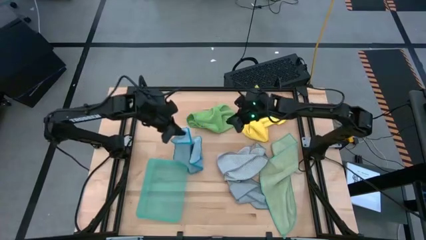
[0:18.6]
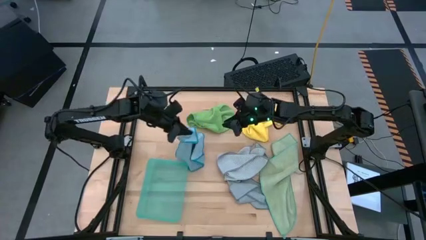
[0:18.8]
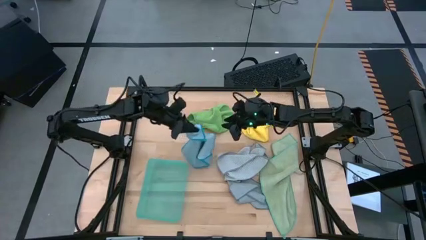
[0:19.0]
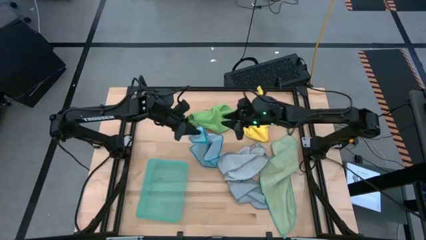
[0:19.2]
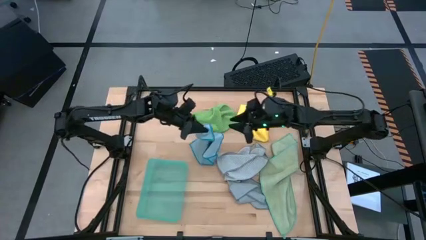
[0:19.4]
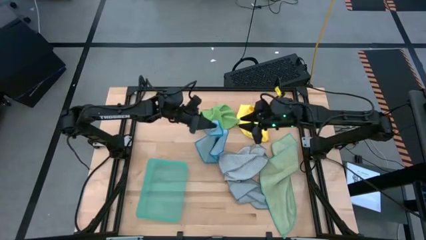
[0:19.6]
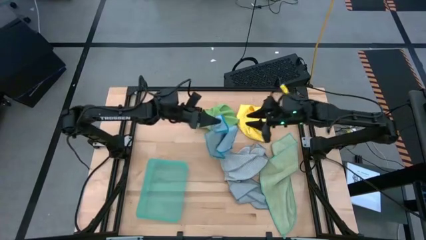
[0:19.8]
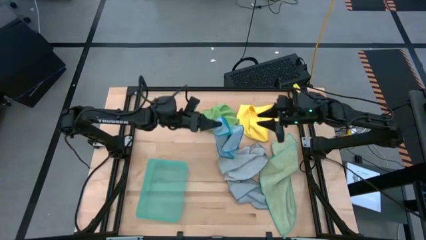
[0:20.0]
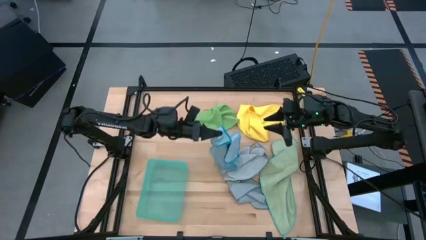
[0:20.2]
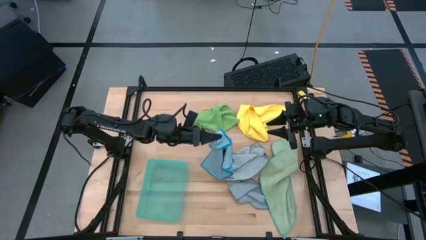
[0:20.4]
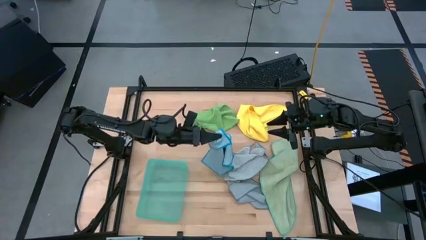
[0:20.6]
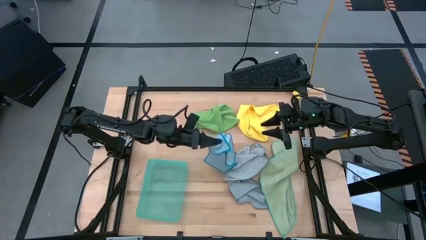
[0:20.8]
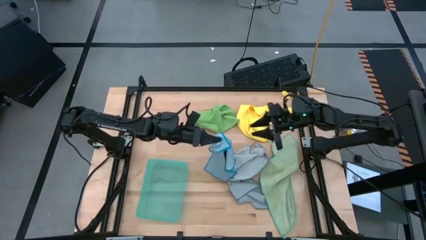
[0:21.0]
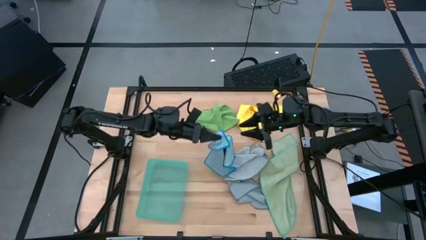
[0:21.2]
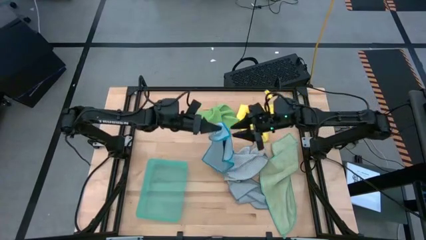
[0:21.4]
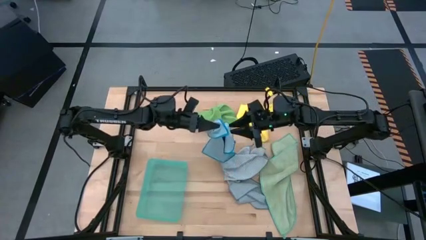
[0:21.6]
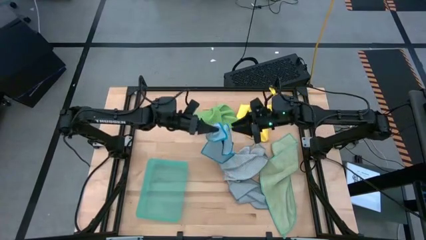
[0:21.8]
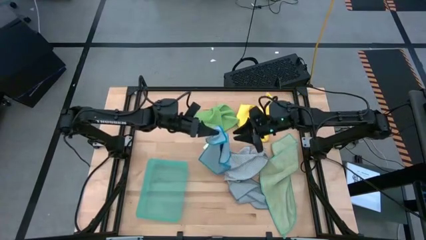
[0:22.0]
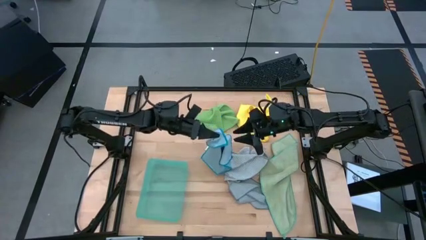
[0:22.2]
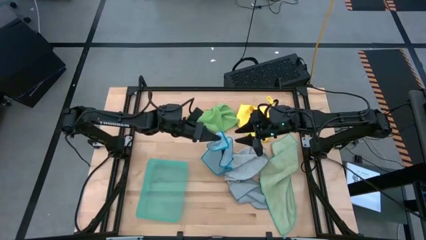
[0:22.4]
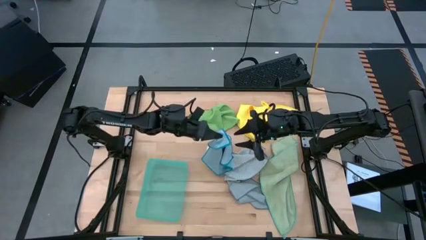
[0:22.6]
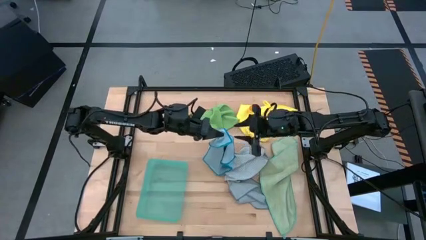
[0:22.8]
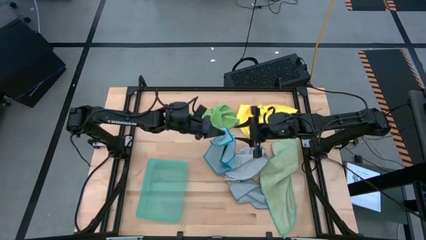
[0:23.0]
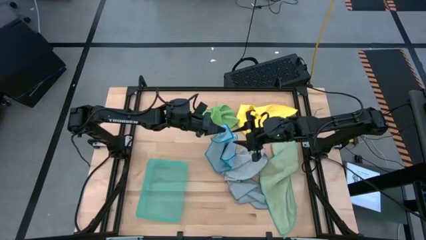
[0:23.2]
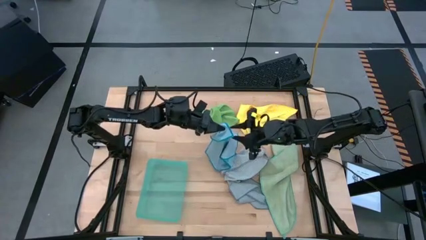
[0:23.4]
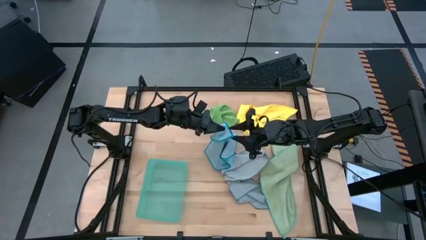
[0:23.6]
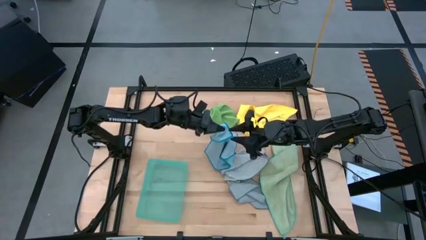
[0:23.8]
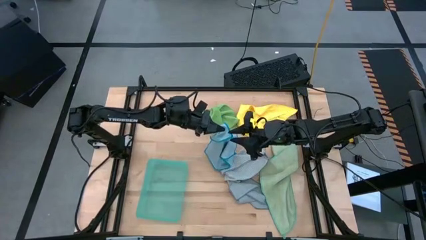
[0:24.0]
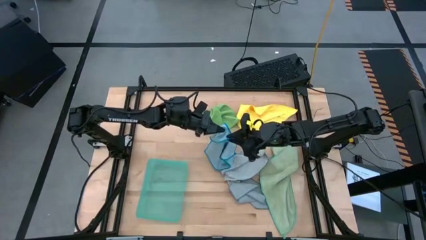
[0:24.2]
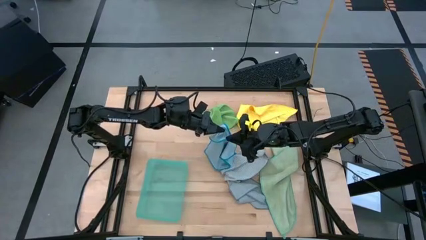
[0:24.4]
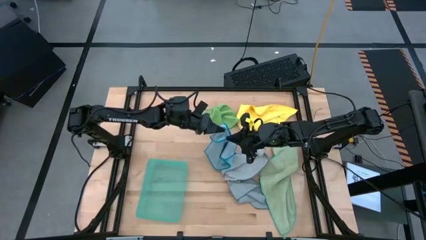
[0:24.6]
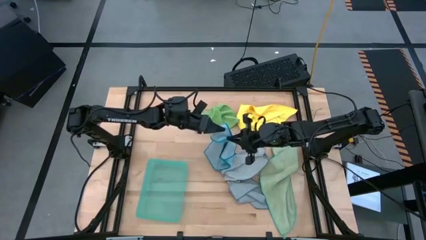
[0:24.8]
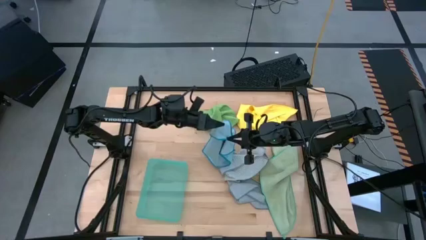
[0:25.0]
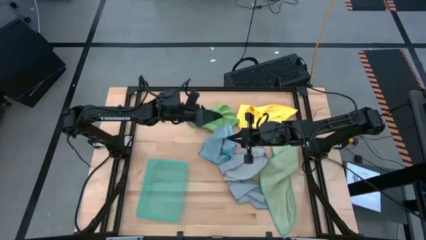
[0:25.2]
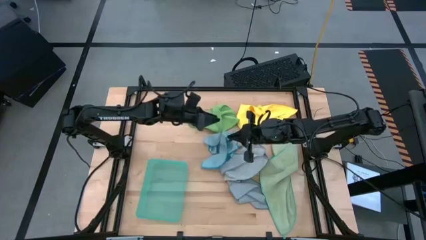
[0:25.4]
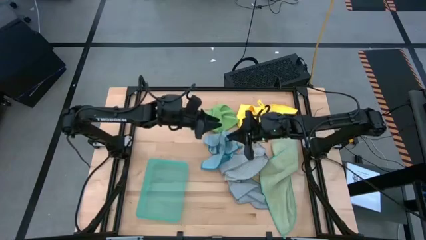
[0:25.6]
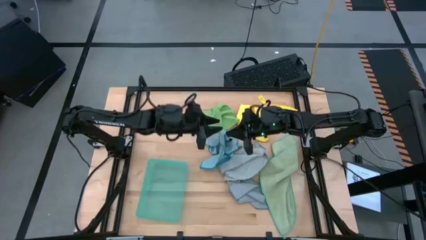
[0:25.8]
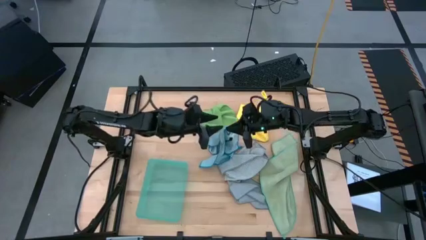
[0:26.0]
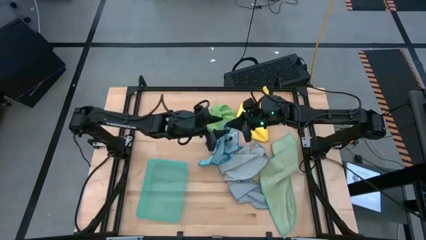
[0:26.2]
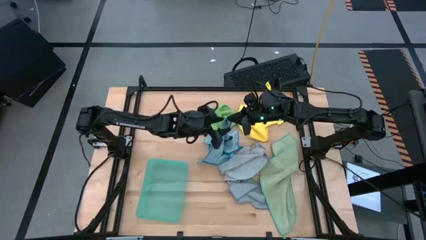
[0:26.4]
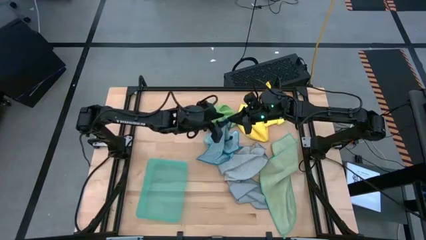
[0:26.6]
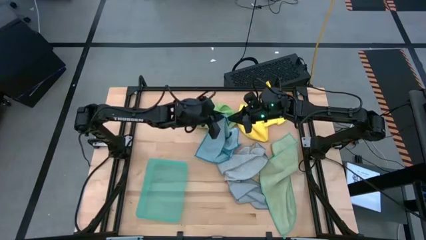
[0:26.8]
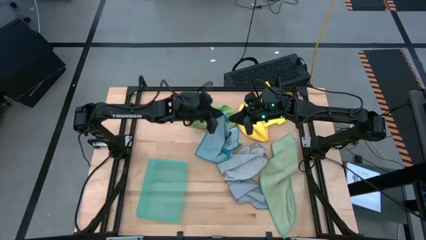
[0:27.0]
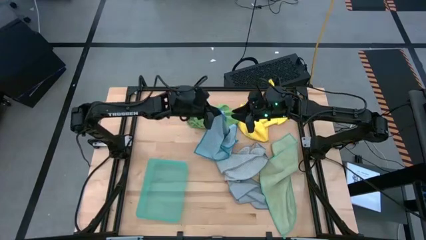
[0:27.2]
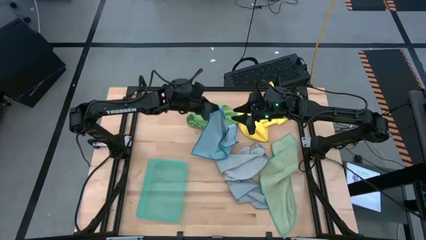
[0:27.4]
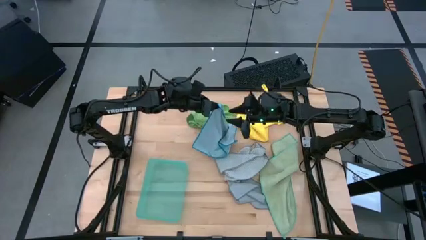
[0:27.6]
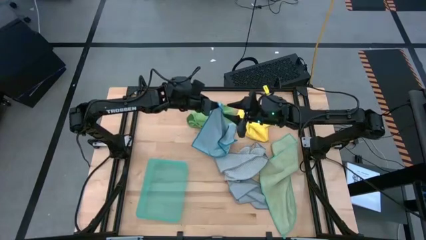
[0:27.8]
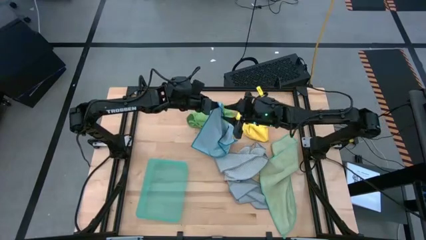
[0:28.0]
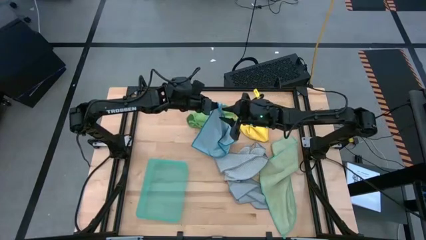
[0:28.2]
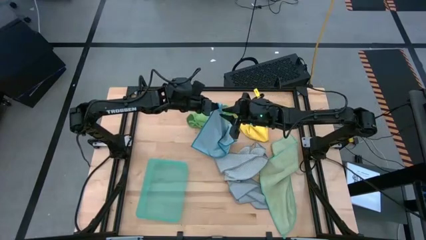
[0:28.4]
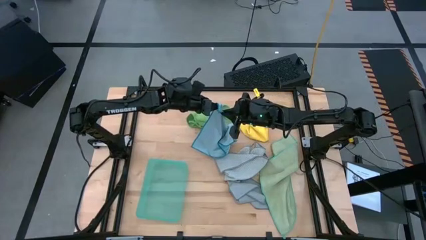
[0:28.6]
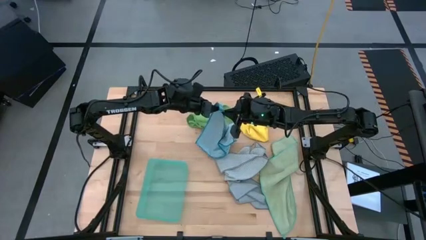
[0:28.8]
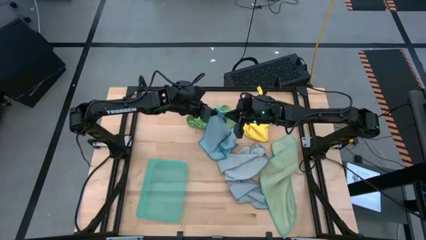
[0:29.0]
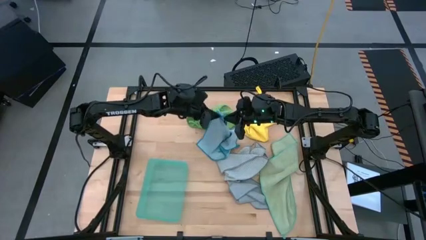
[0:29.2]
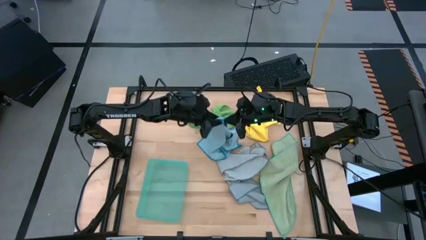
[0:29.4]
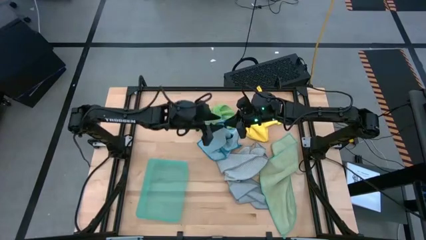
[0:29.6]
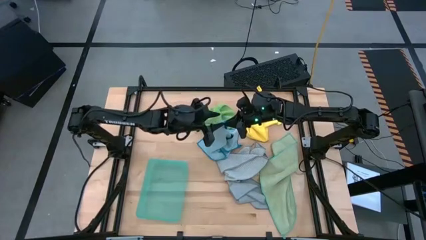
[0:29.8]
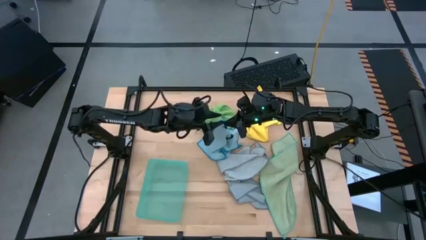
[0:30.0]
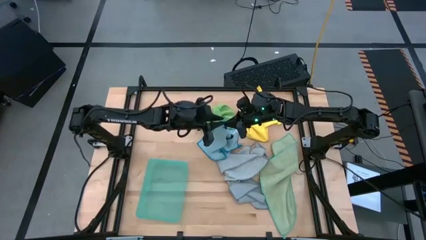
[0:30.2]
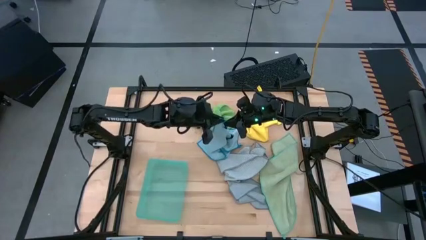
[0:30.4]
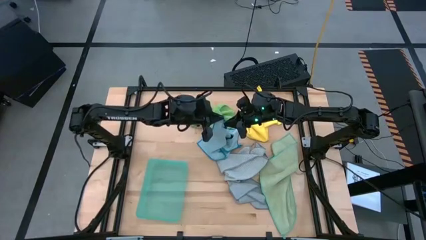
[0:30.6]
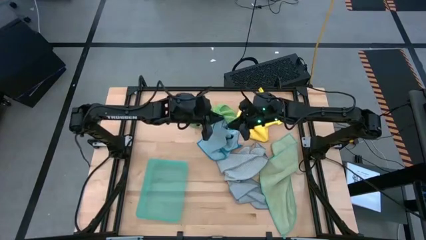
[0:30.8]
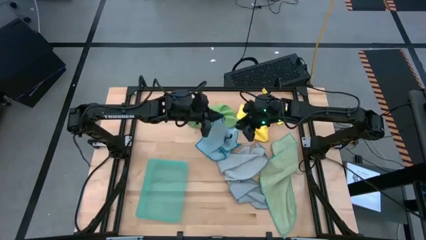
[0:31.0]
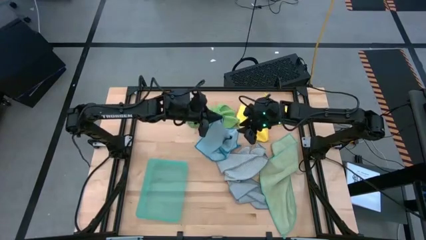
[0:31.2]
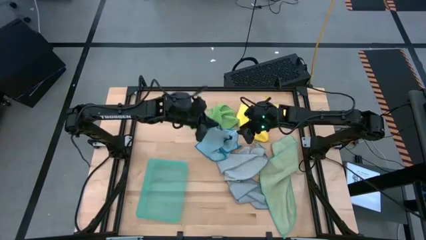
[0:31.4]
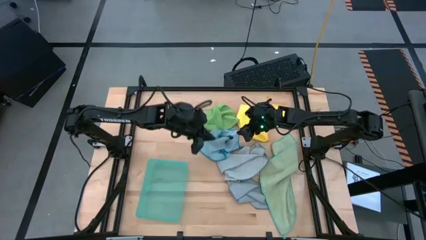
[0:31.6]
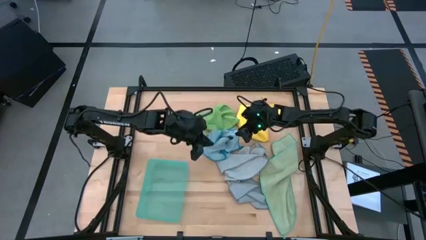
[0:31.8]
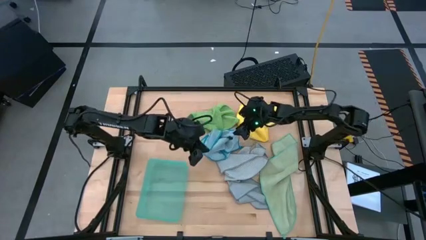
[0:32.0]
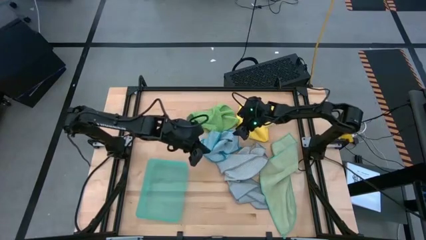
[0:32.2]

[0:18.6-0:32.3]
Task: Fold microfiber towels
Fold the blue microfiber cloth

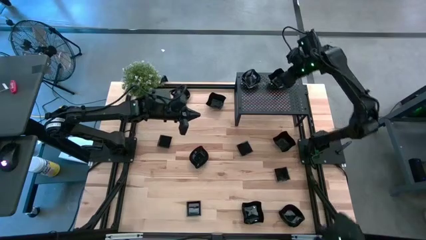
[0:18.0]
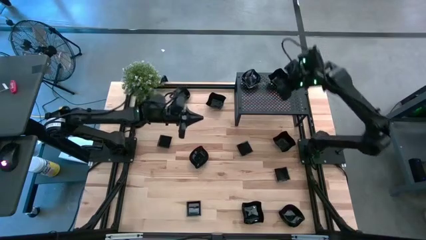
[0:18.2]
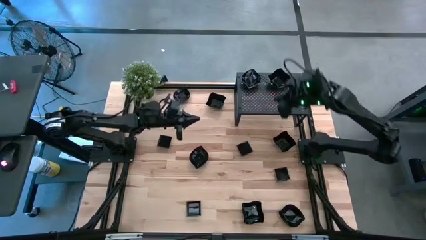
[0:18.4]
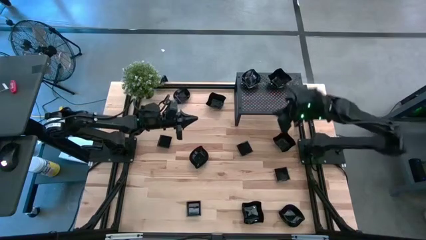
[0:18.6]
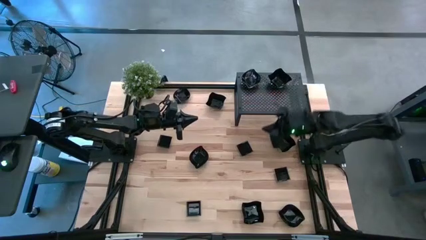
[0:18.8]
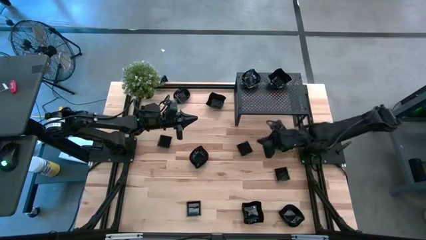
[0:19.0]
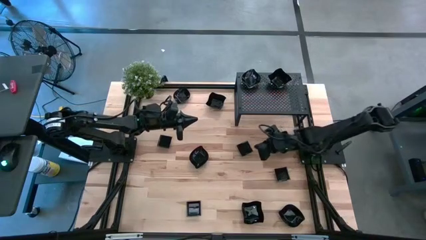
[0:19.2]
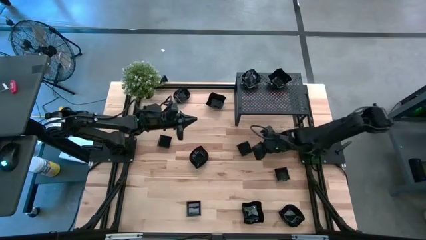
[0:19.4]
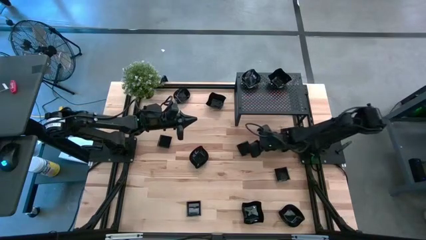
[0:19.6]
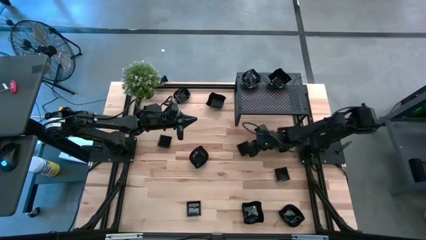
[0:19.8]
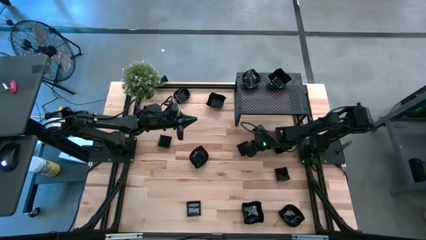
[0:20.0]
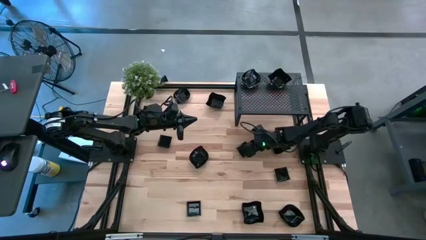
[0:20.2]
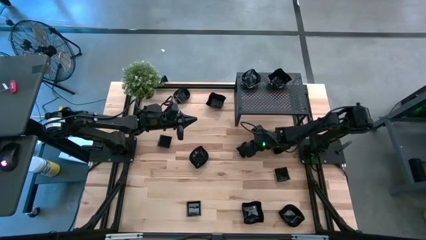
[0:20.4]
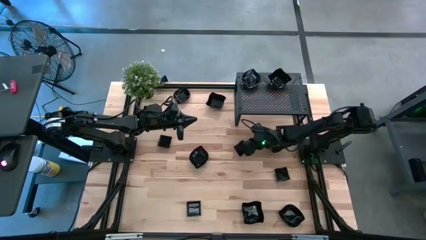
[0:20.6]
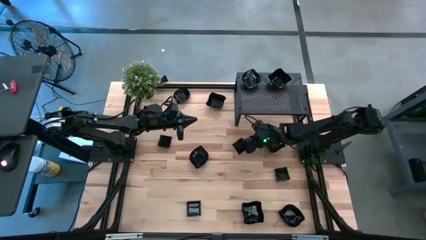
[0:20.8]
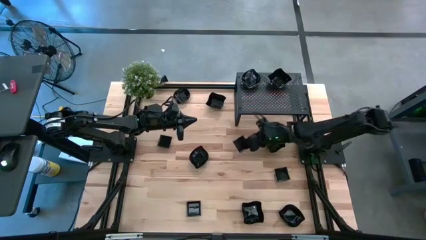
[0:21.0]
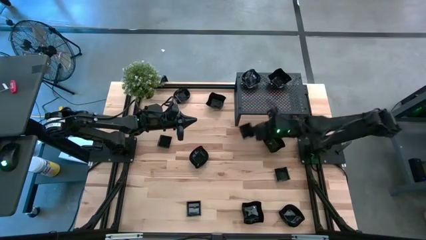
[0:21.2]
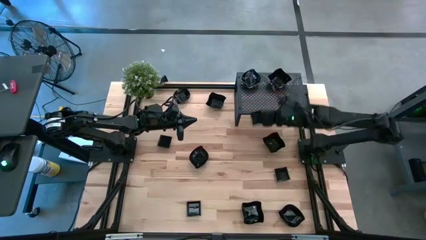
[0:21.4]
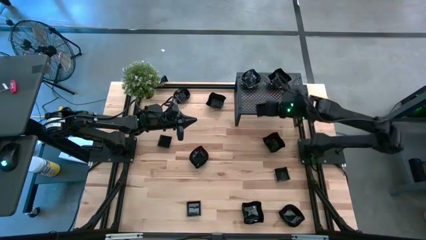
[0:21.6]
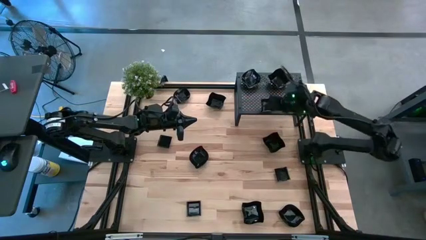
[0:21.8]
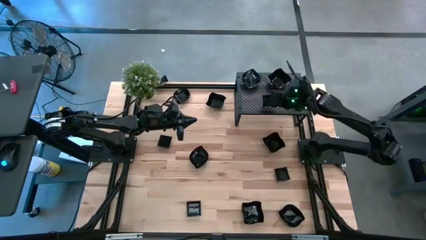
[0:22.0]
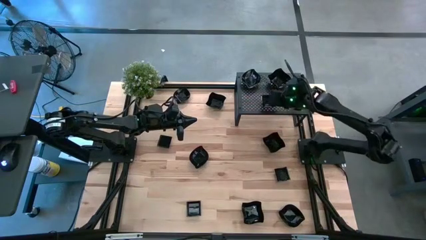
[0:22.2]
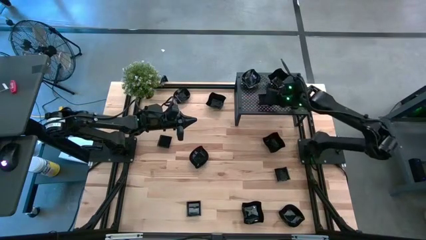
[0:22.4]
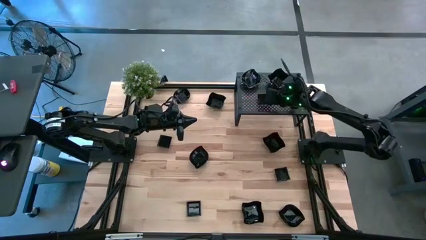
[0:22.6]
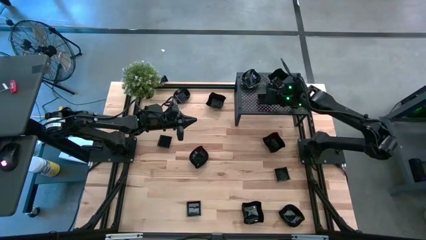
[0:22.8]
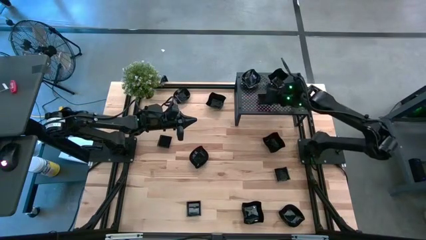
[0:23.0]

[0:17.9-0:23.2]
Task: Pick & Place Mini shaped plates
Put the black square plate on the shelf
